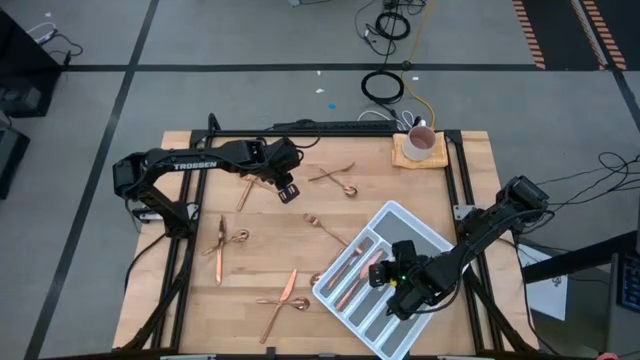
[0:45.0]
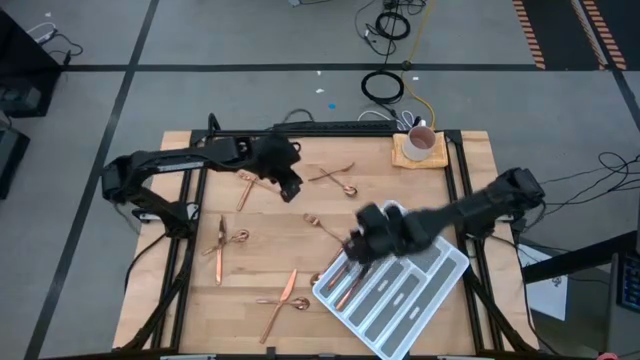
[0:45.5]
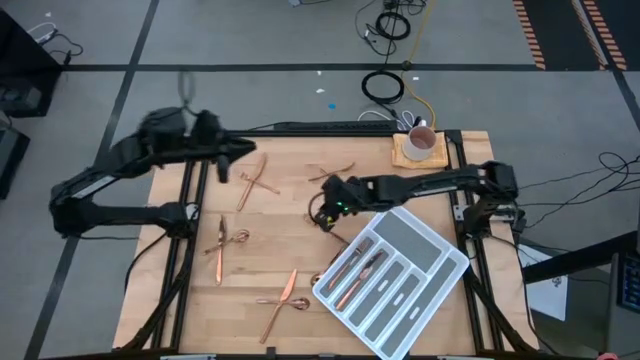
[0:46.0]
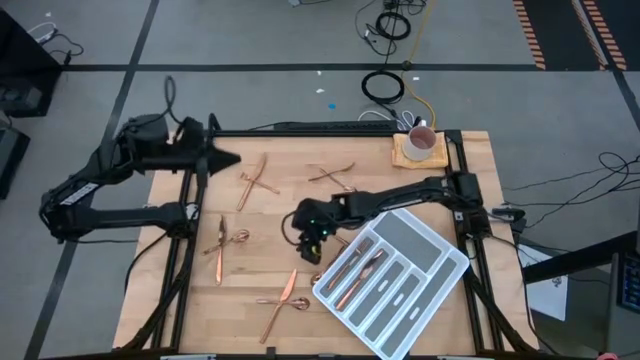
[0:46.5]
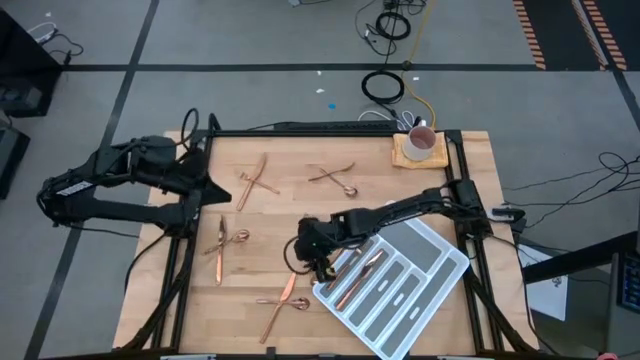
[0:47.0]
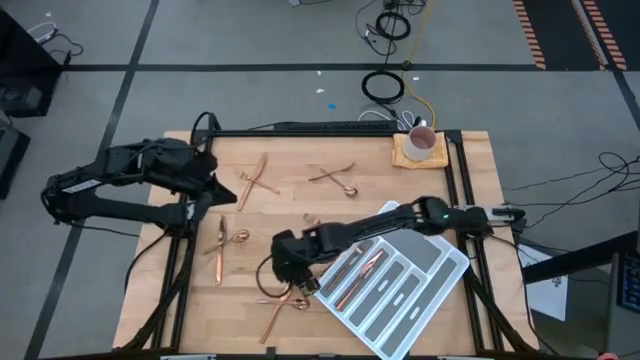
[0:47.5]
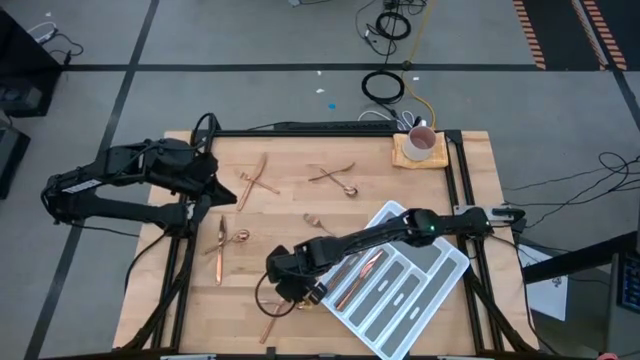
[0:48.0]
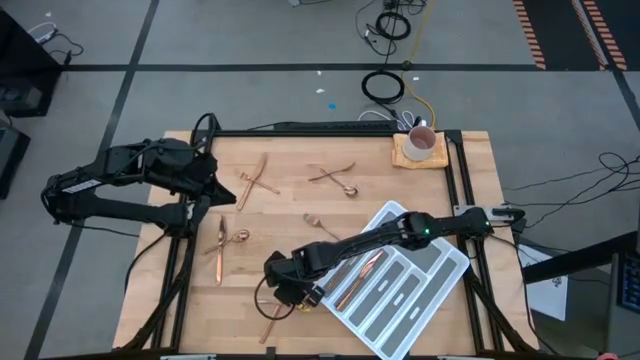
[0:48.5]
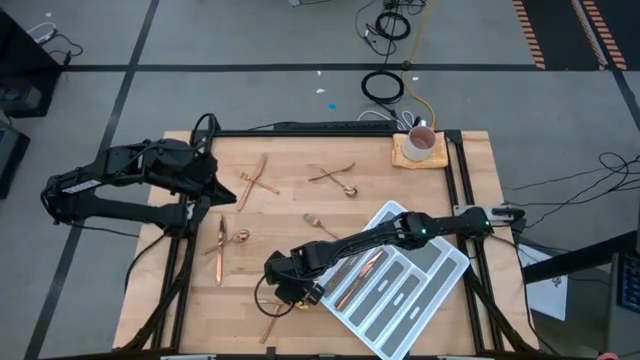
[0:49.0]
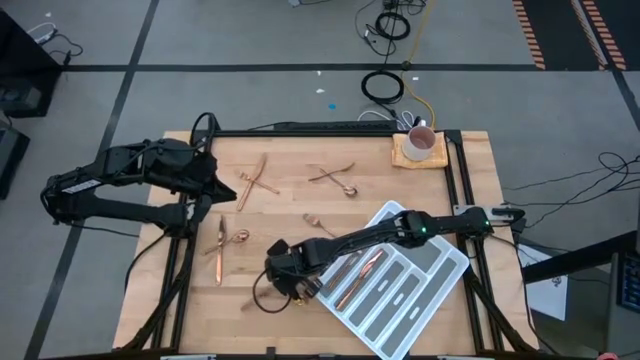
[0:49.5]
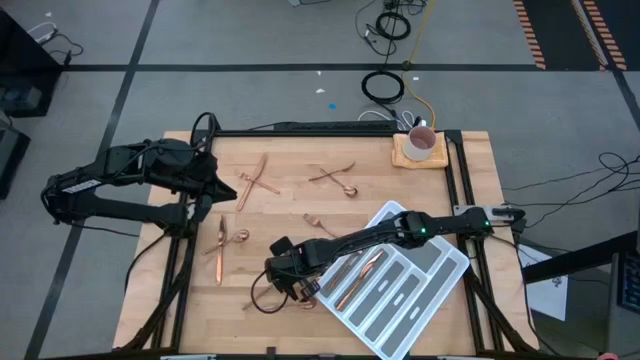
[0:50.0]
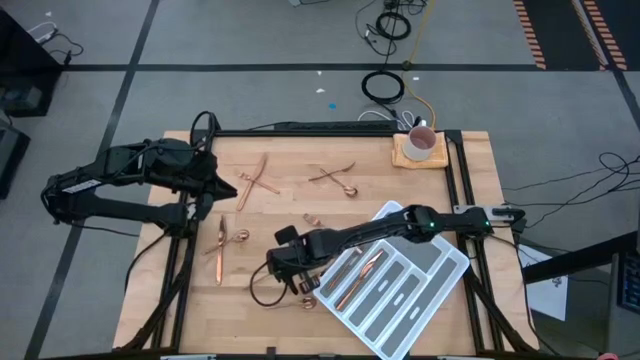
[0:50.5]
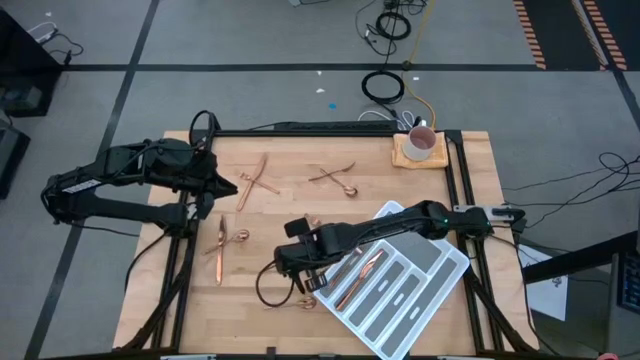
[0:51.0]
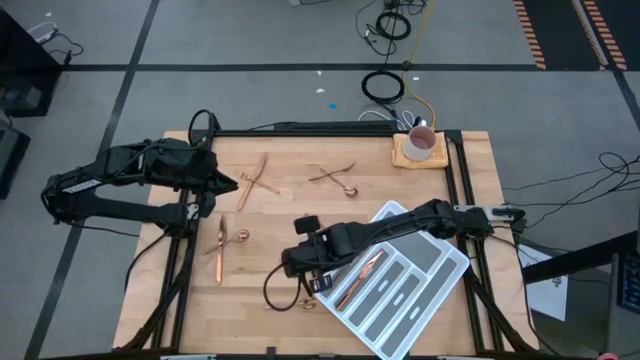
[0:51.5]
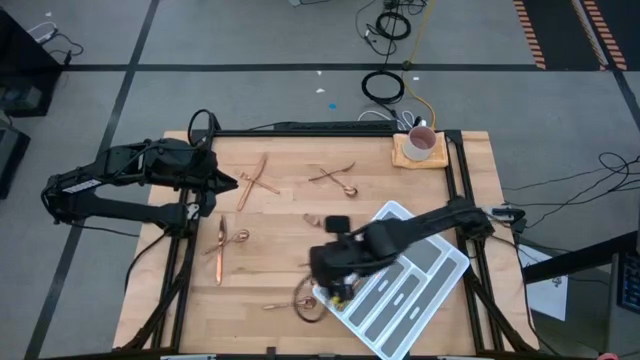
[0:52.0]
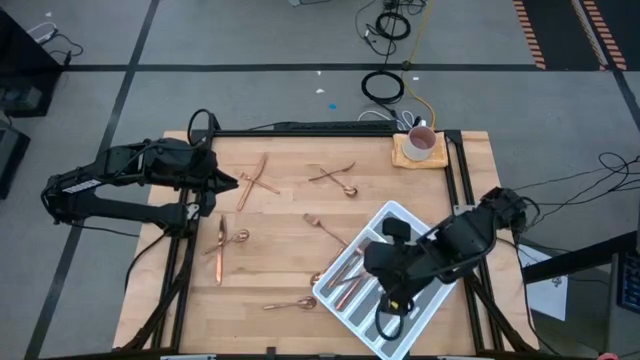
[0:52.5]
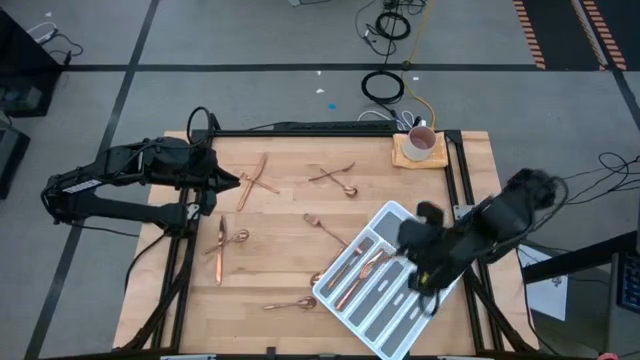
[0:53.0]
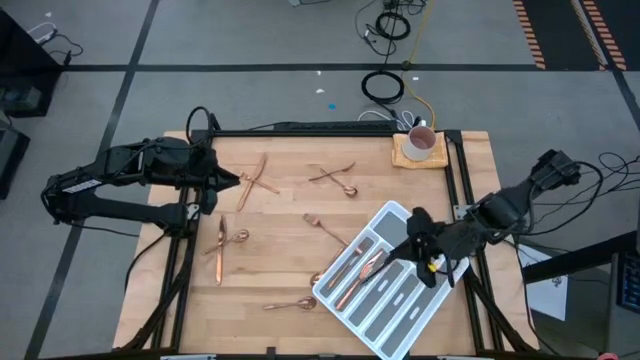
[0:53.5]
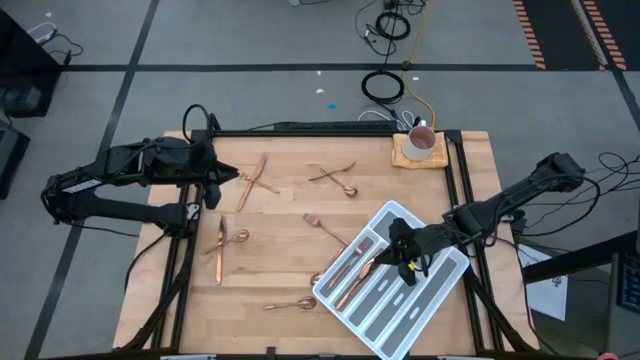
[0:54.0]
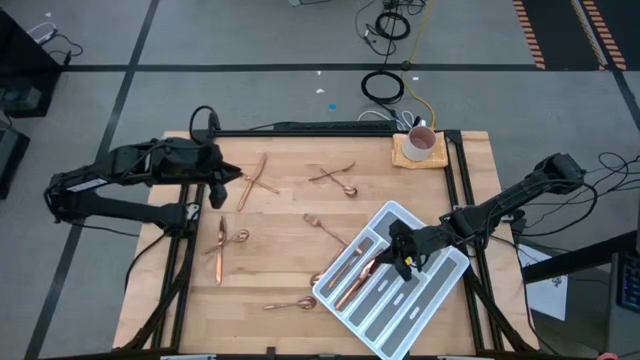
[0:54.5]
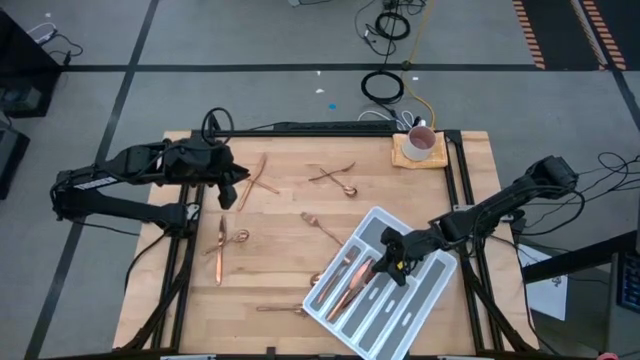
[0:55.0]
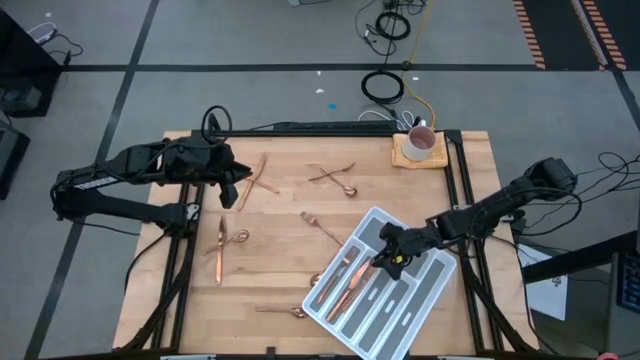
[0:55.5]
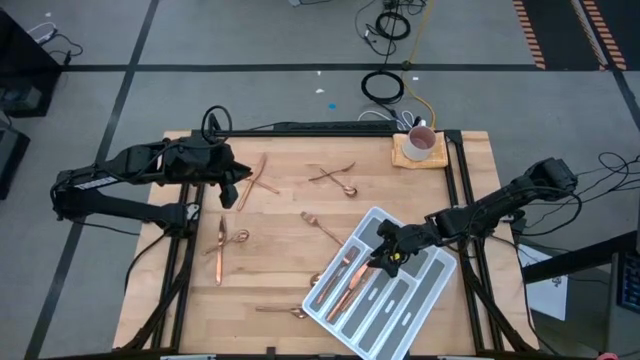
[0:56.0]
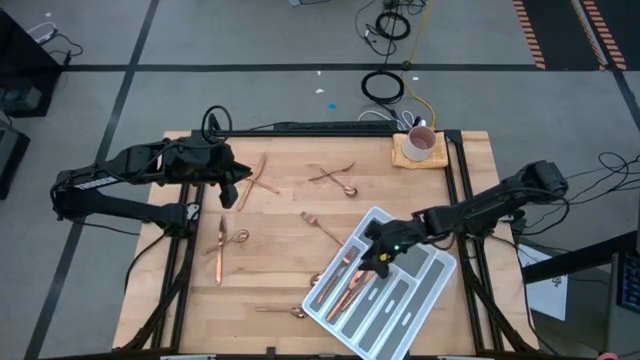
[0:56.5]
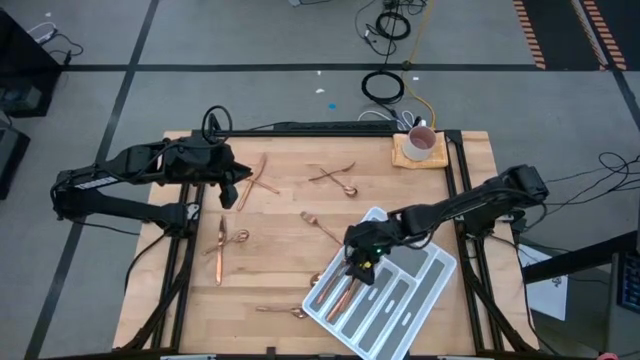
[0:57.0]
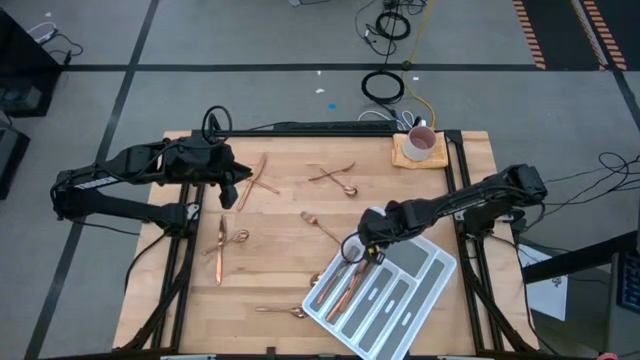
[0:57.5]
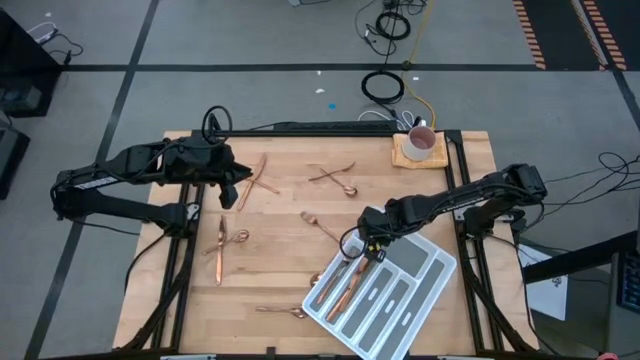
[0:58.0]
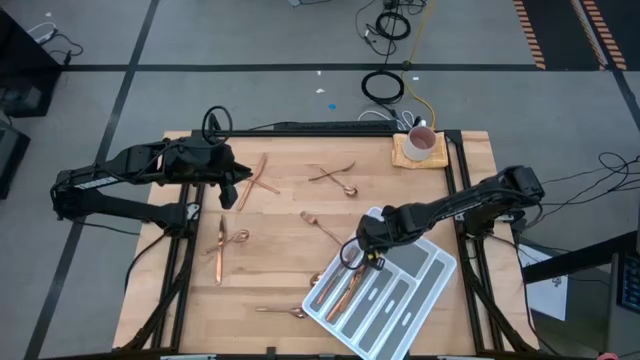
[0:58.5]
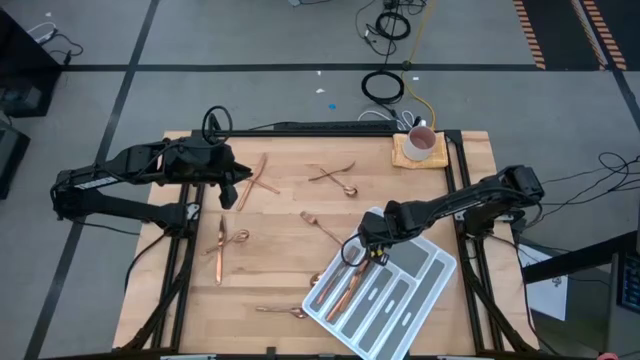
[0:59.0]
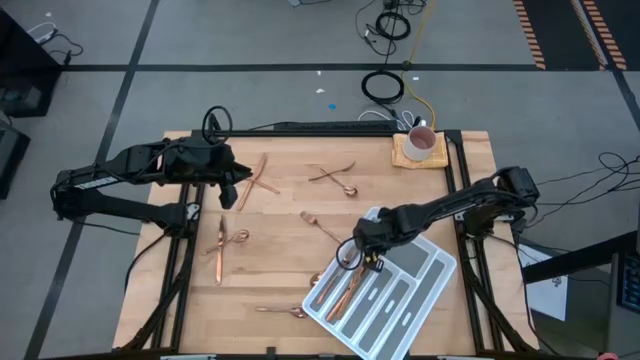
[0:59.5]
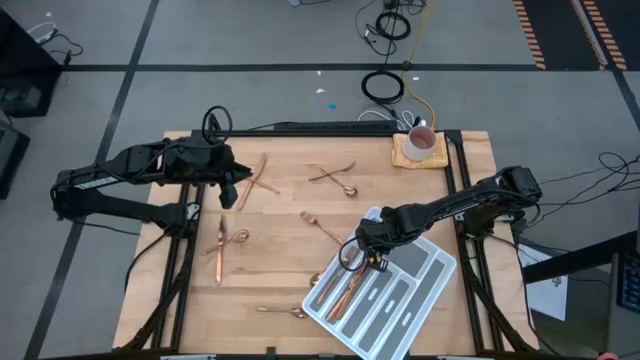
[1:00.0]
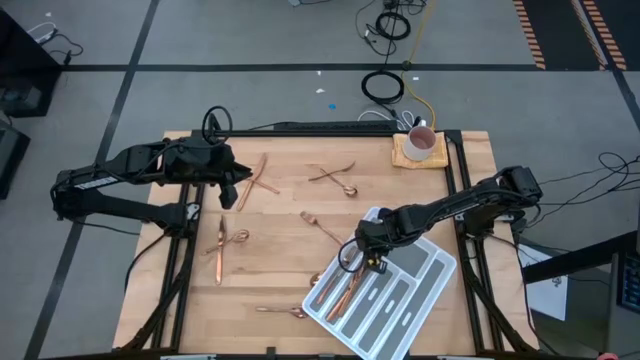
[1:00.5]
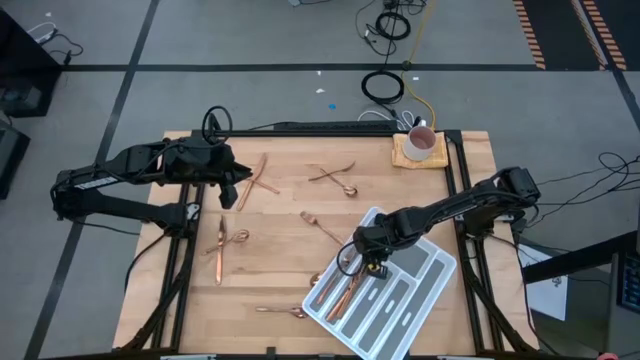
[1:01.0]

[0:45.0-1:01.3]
Task: Sort silverware
Put the gold knife into the silverware tray
